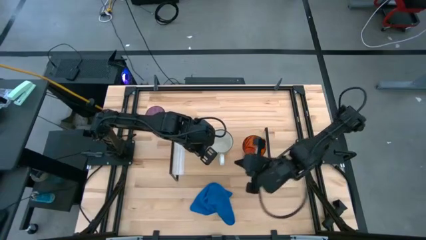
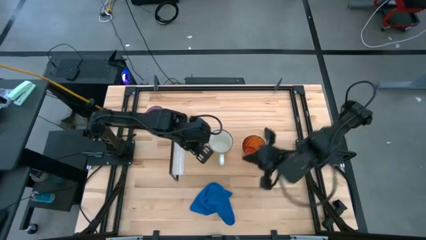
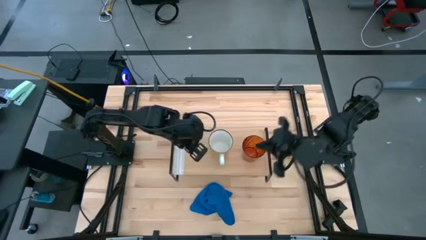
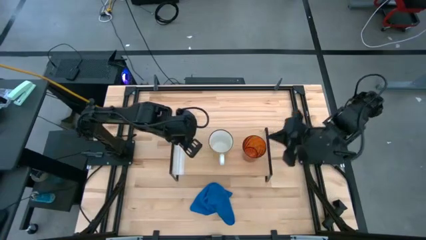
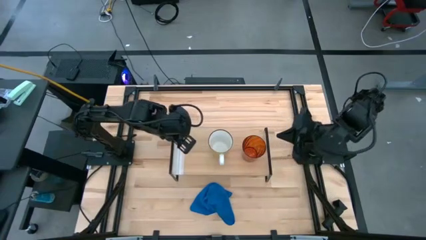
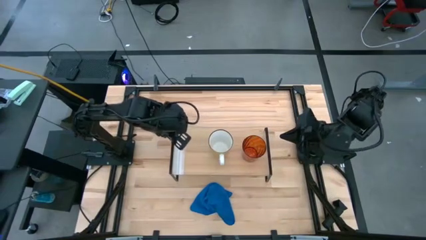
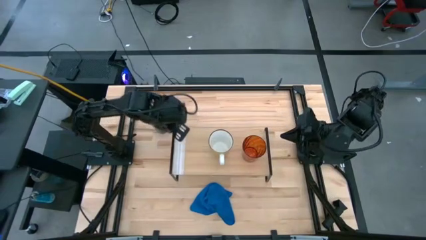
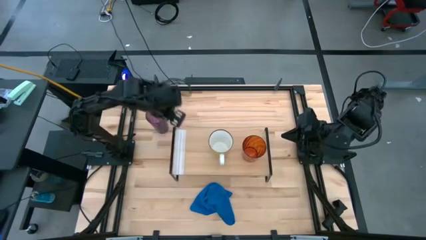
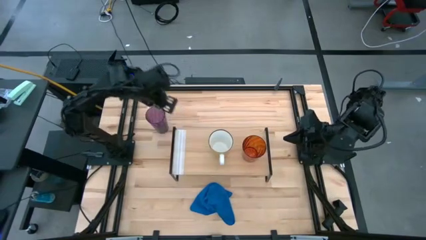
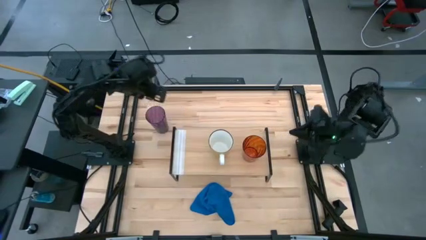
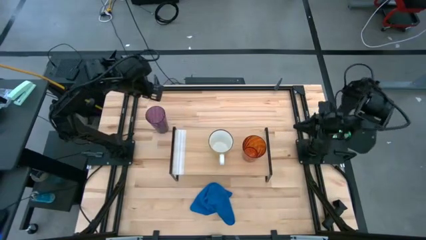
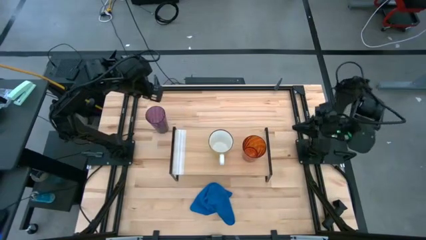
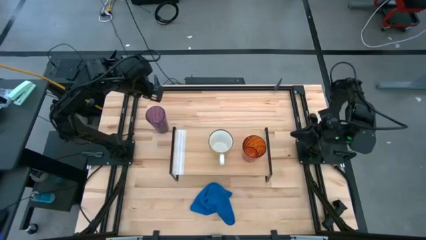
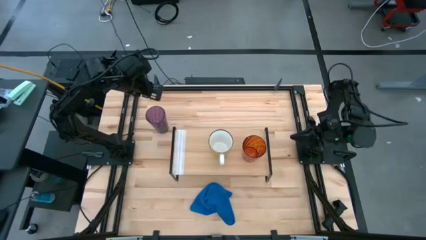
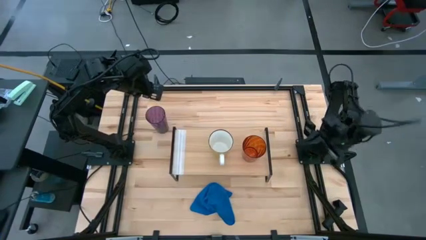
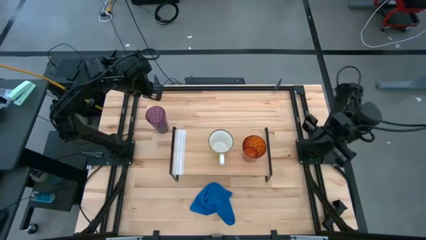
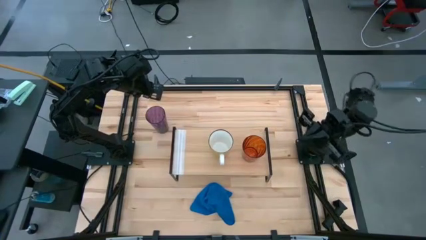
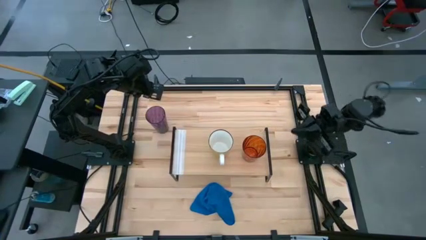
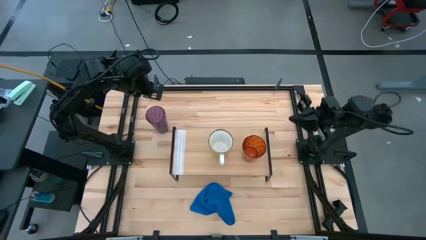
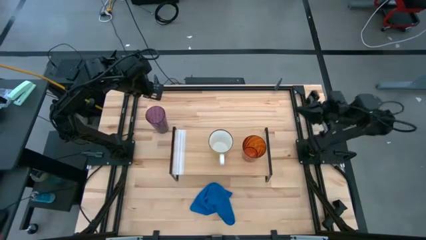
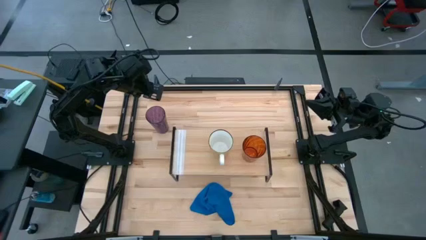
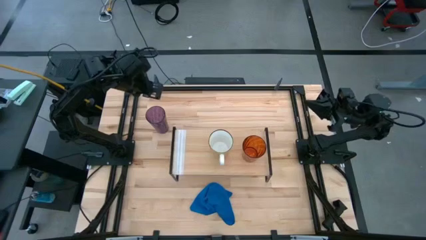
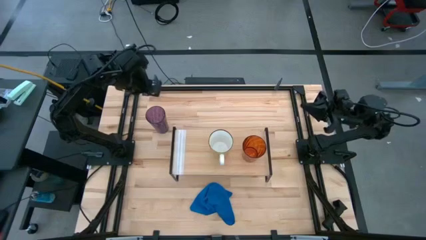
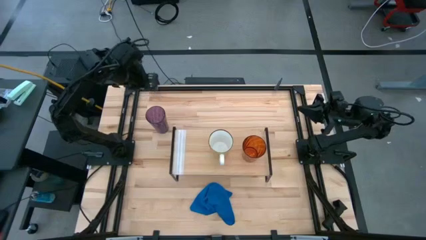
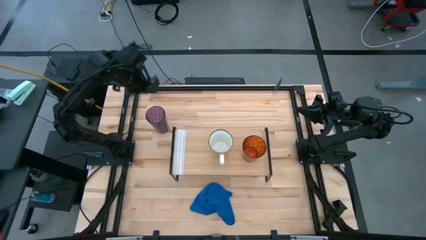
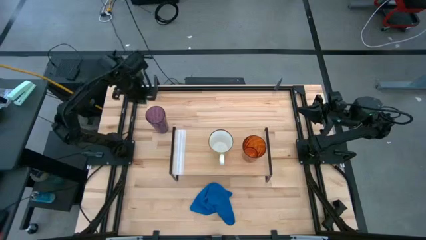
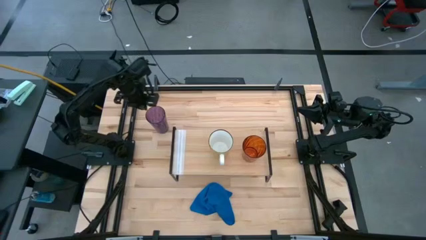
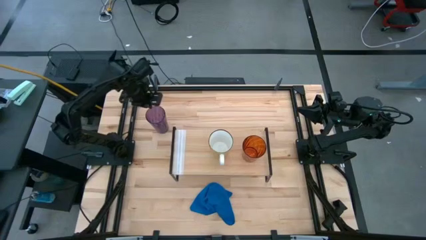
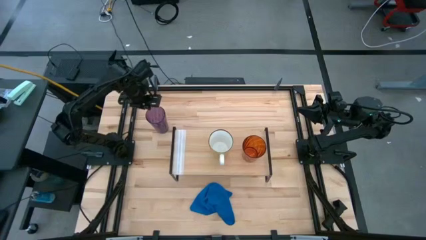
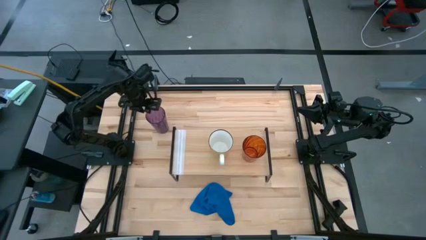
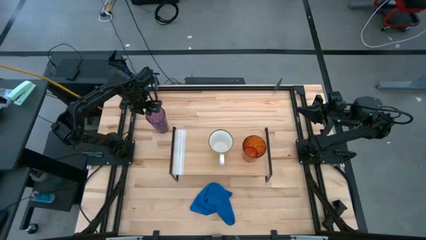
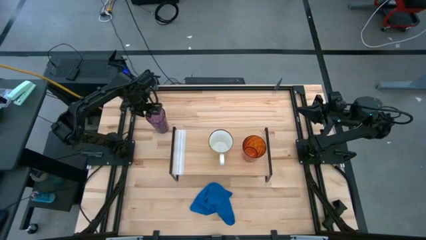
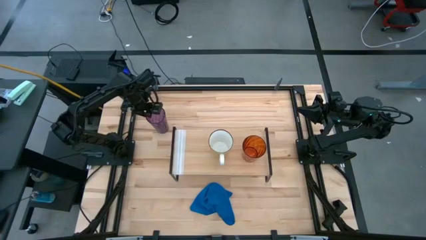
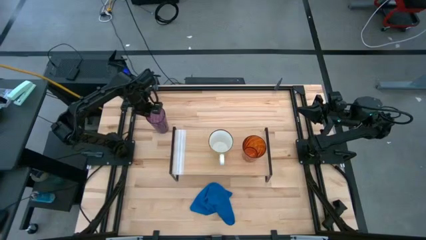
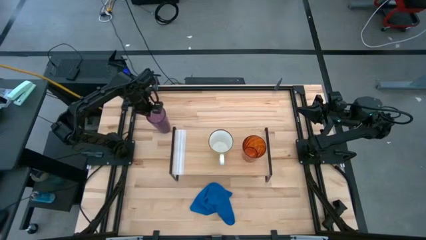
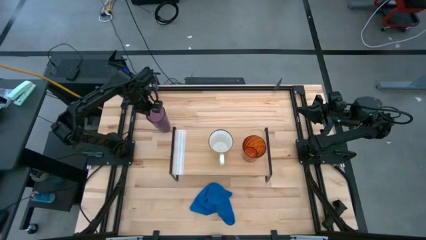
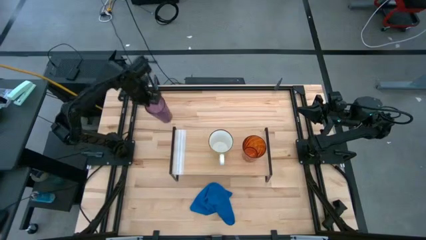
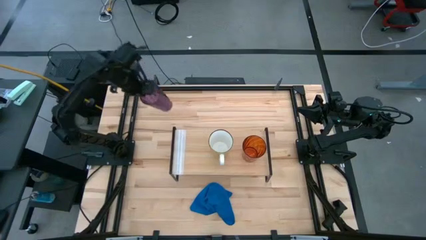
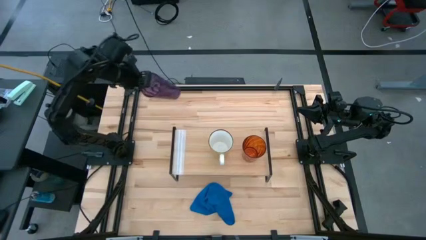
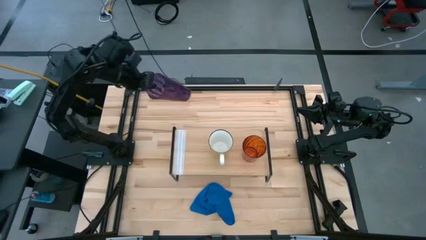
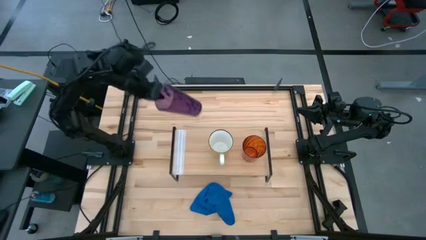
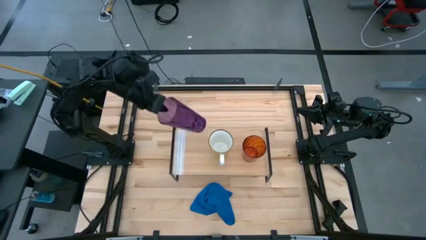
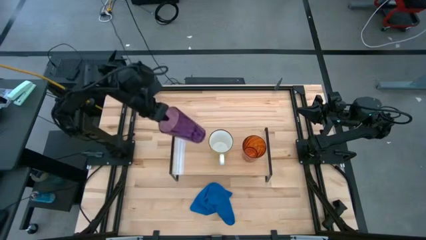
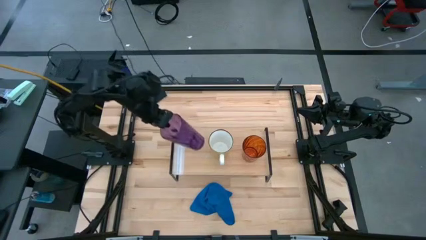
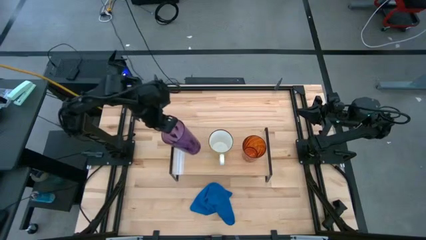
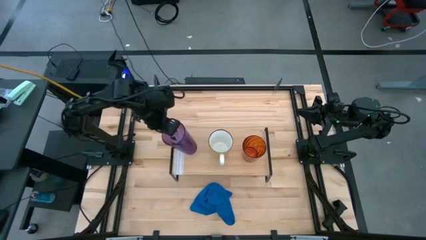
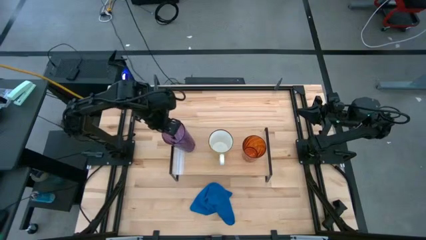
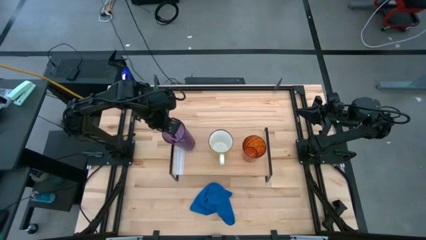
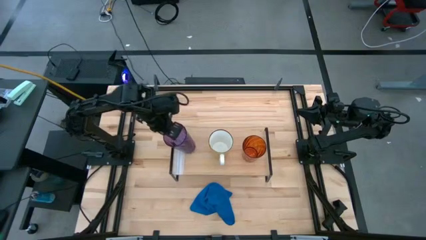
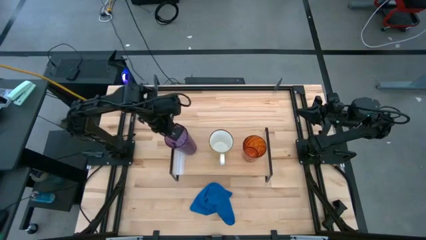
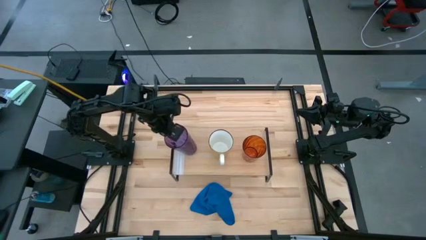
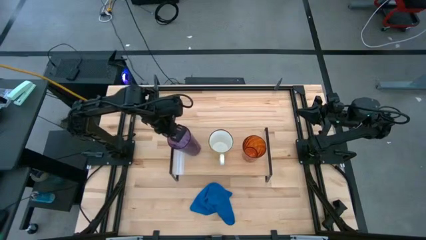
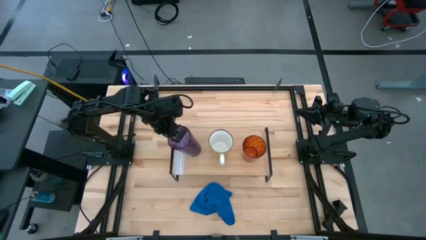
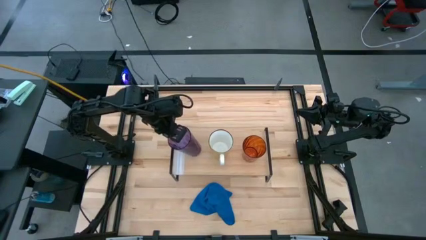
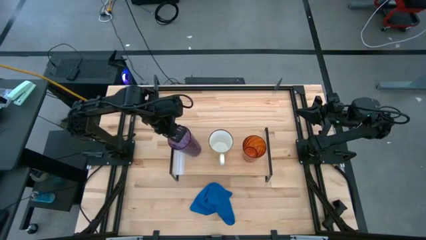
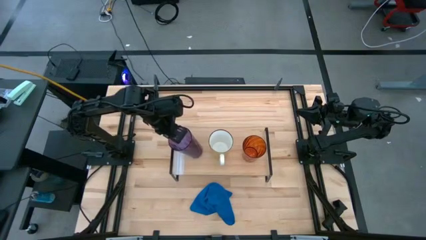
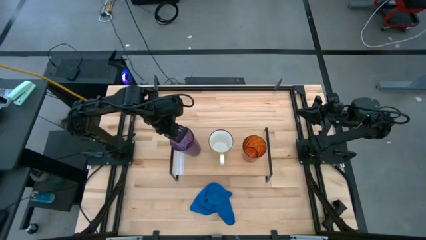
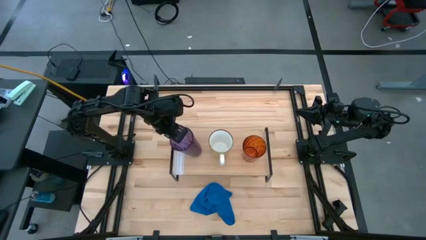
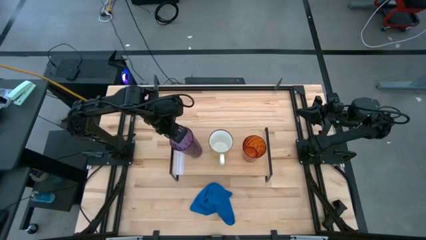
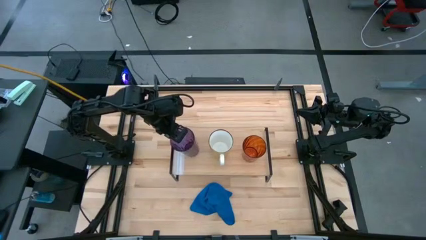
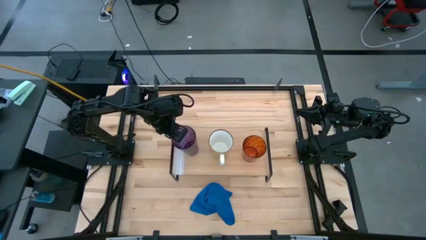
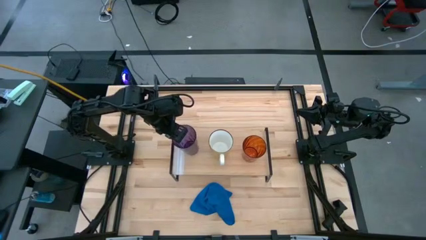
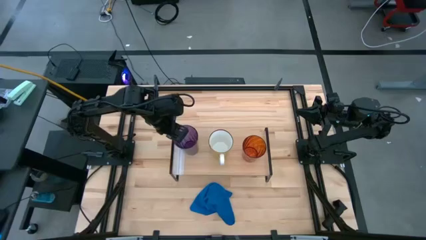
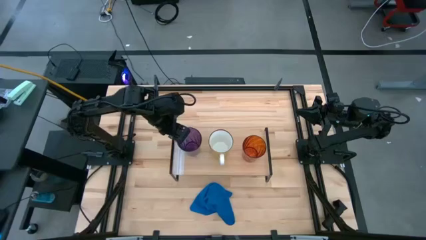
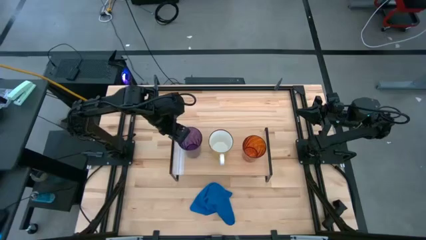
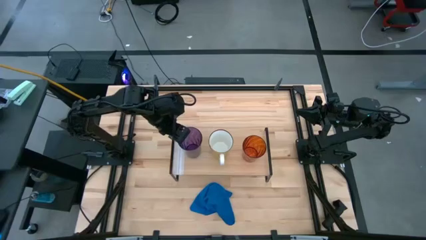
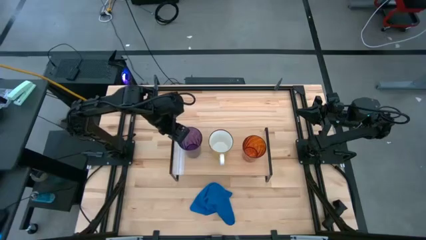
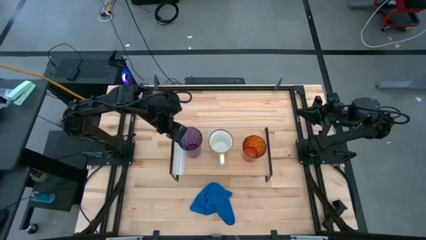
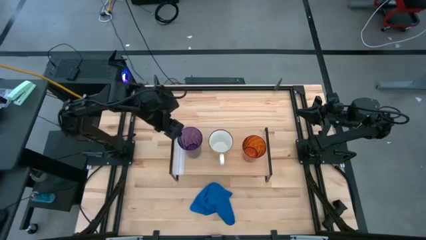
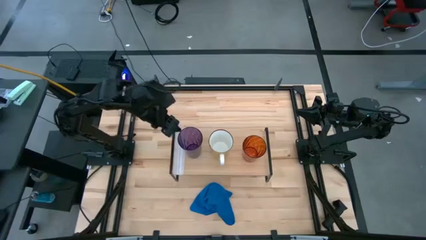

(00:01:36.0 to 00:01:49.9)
Task: Stack small to large cups/mugs on shelf
Put the violet cup on the shelf

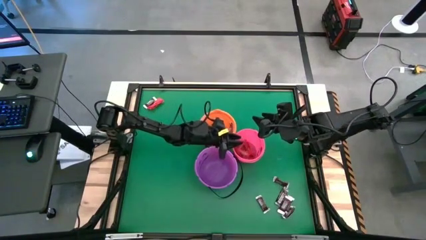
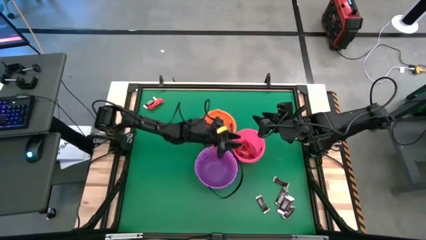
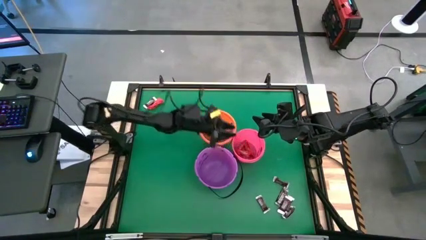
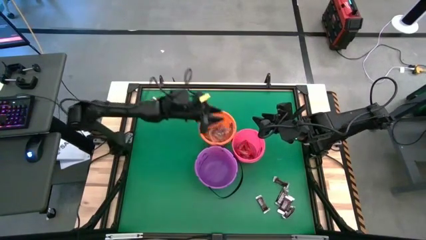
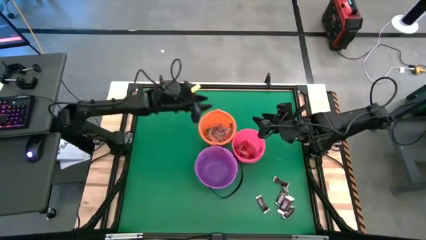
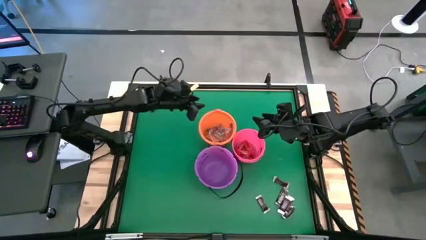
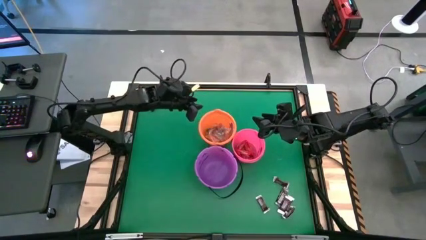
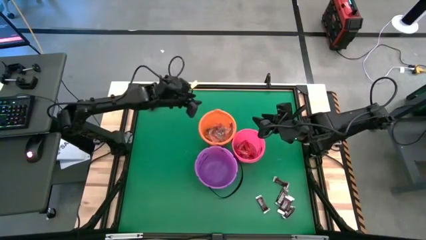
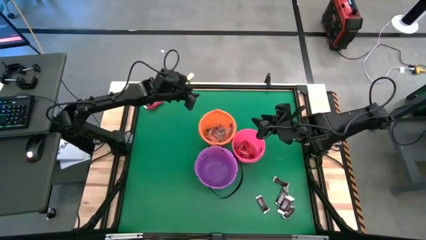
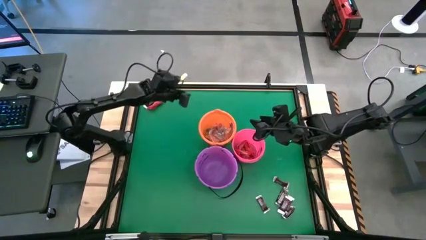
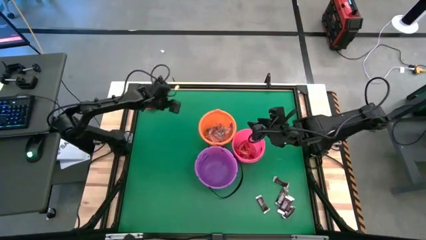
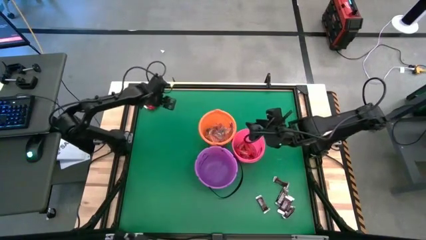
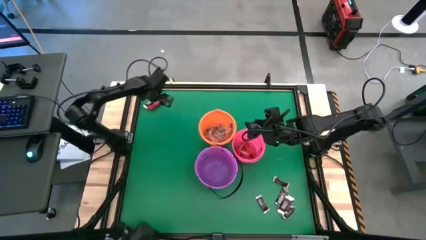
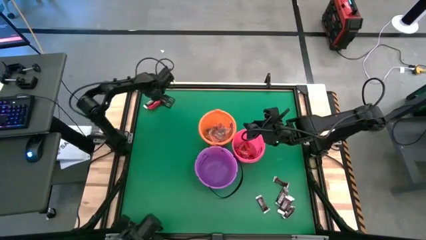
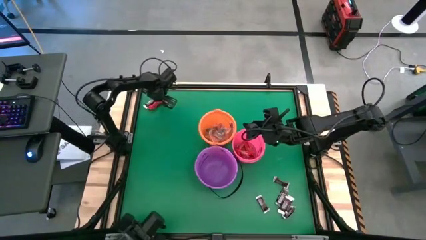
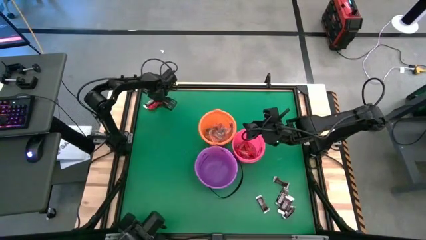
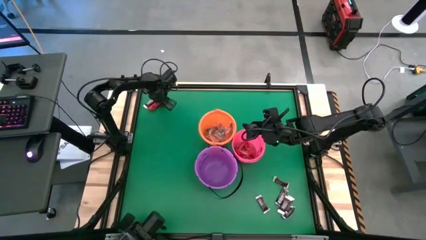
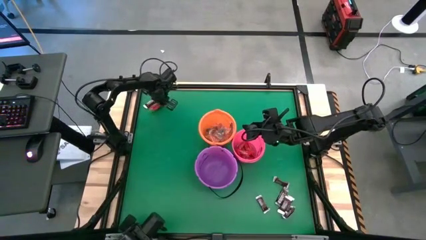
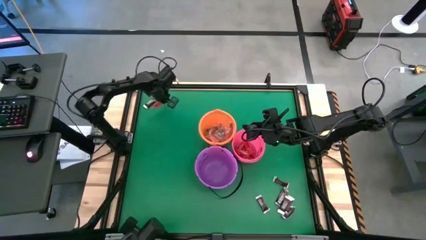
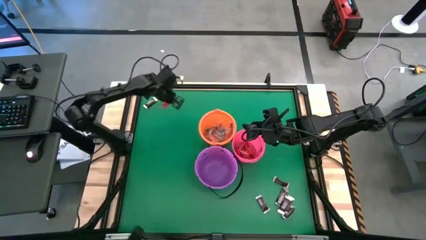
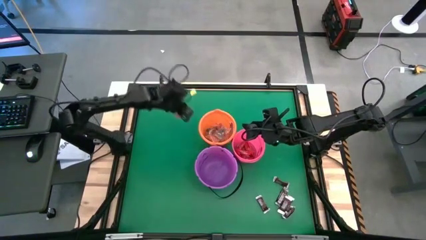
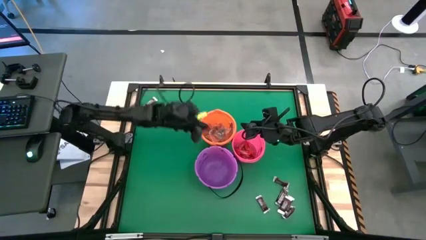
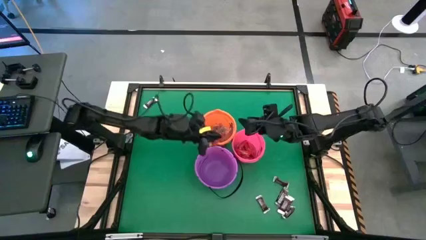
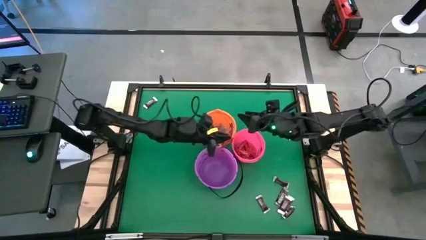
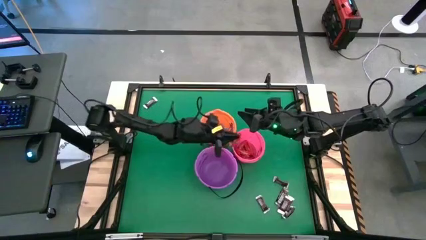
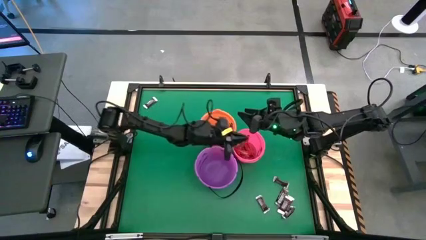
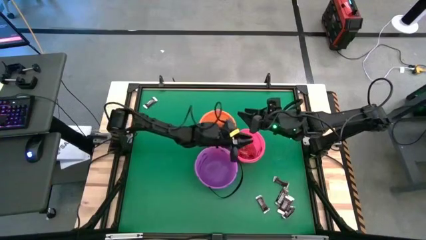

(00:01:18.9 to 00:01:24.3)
Task: Sort candy by brand, put in halloween buckets
Put the red chocolate bar into the pink bucket
